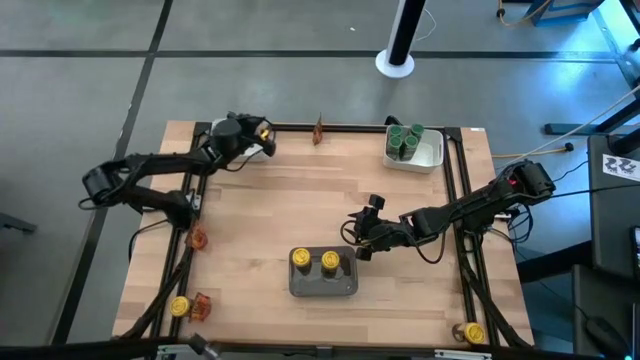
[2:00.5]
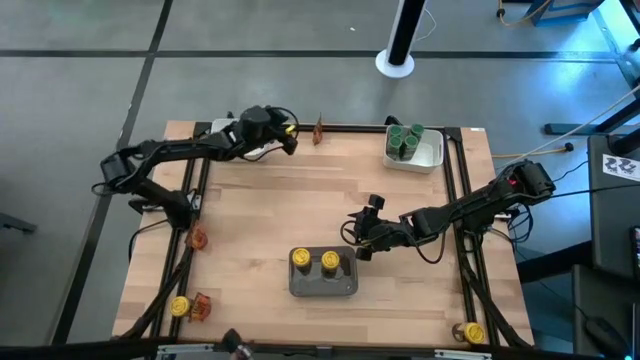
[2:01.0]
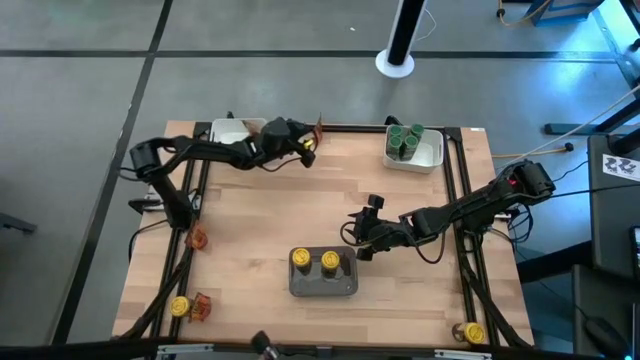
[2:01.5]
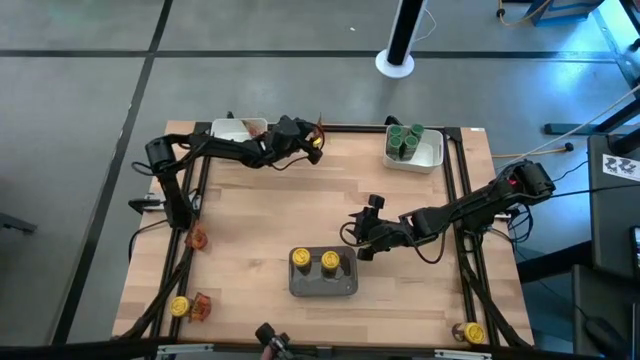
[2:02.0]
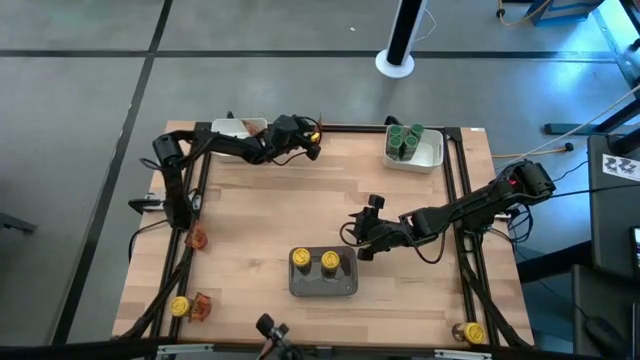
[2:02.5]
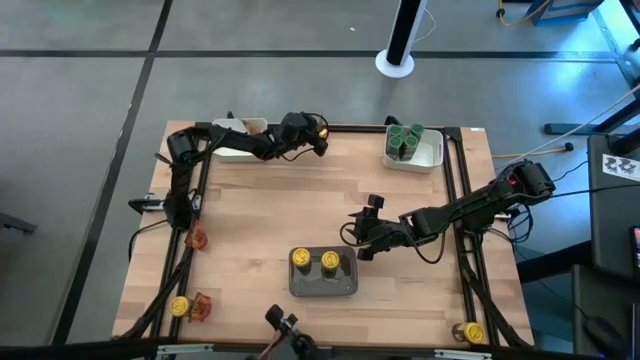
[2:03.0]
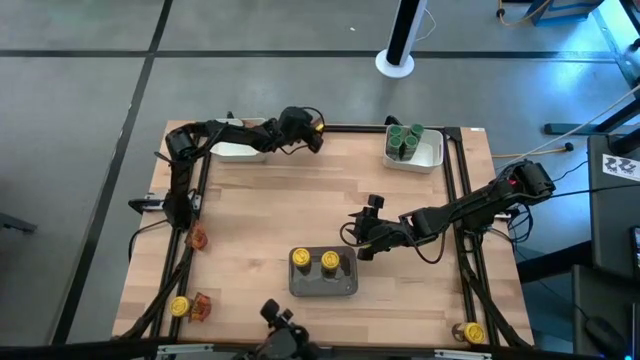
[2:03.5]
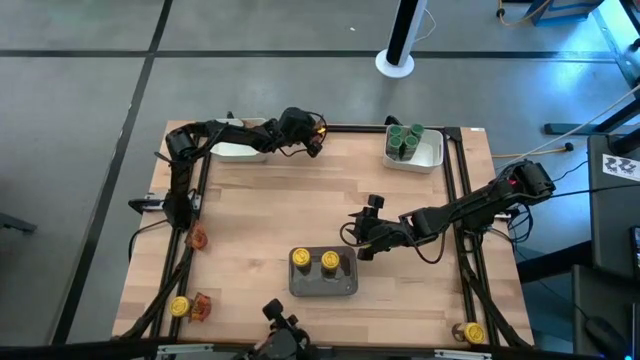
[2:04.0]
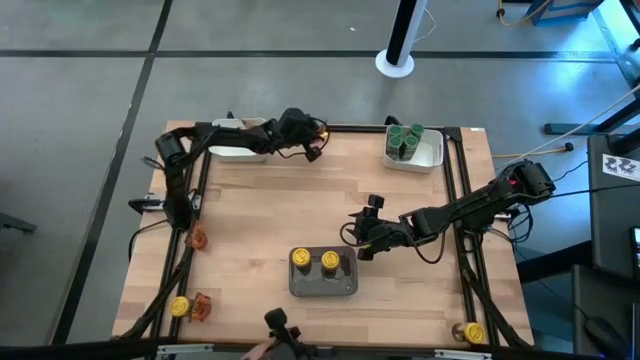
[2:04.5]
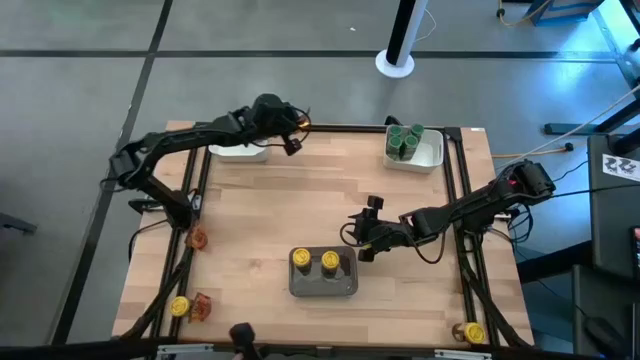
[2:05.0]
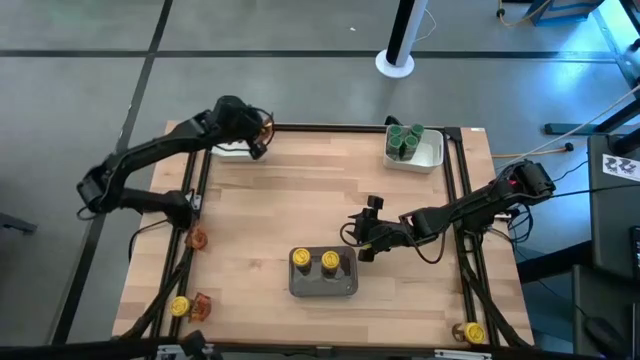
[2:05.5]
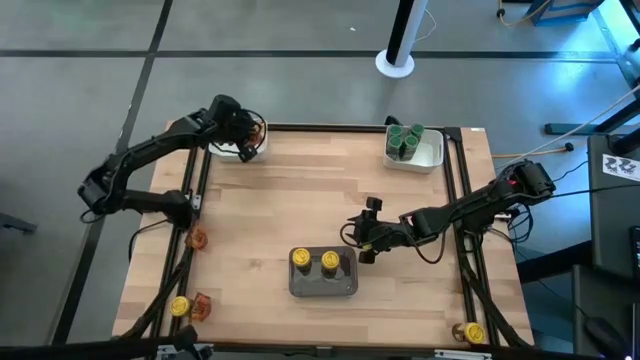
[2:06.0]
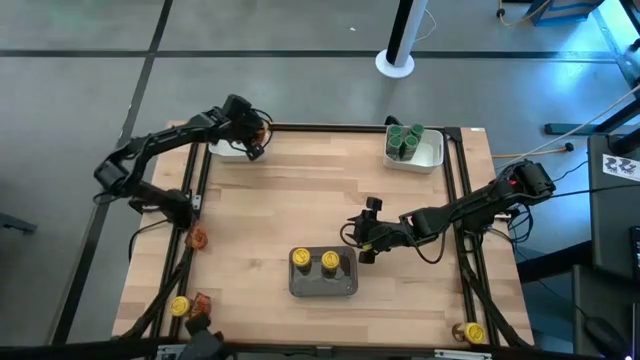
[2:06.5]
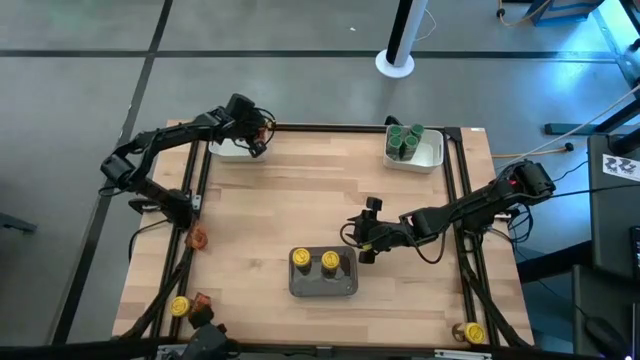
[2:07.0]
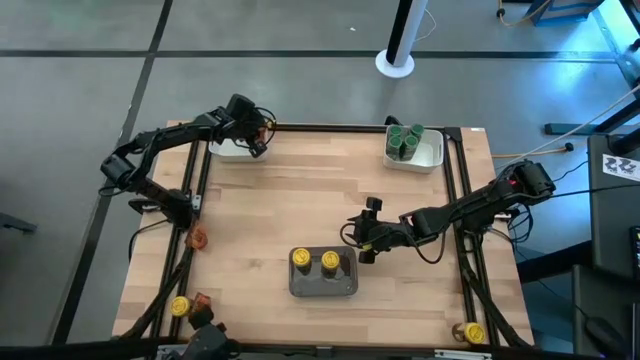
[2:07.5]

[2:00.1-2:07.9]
Task: Sort spices by type
Put the top center orange seasoning bag into the left white bin

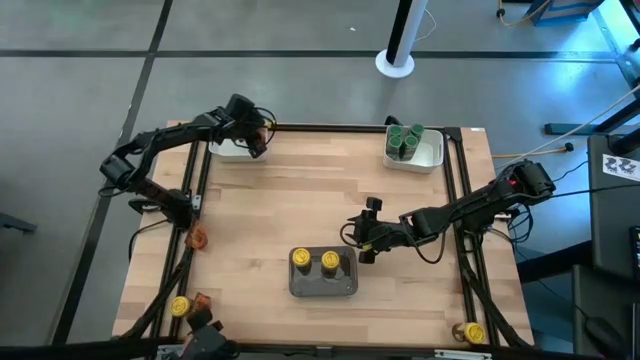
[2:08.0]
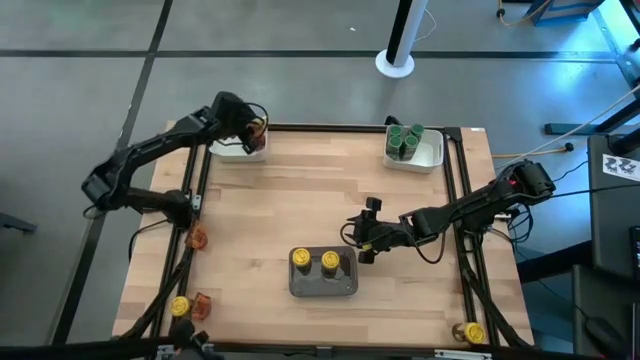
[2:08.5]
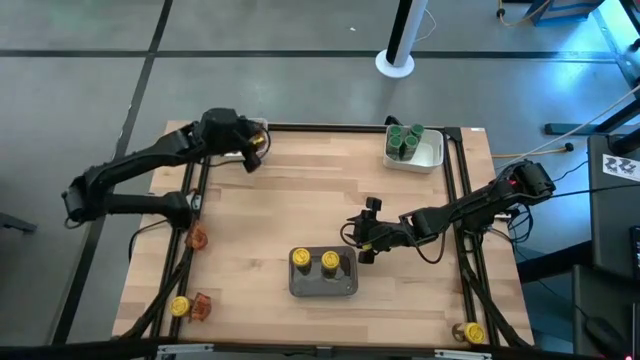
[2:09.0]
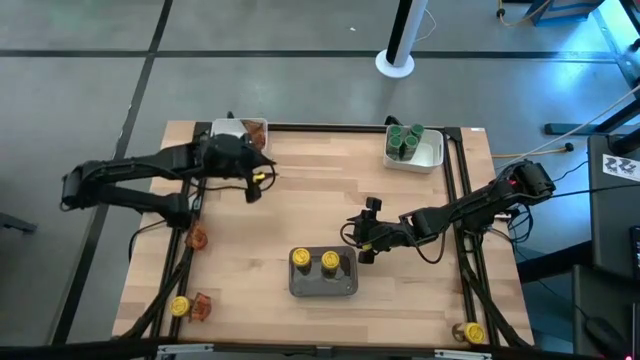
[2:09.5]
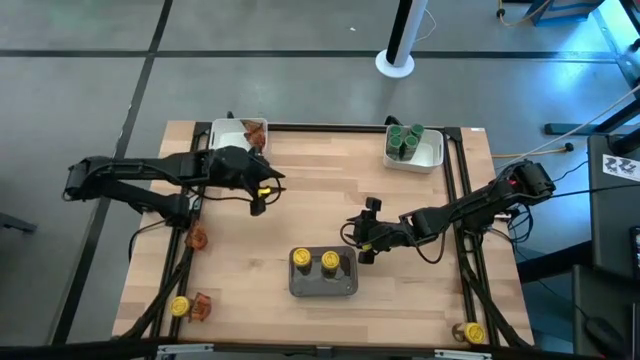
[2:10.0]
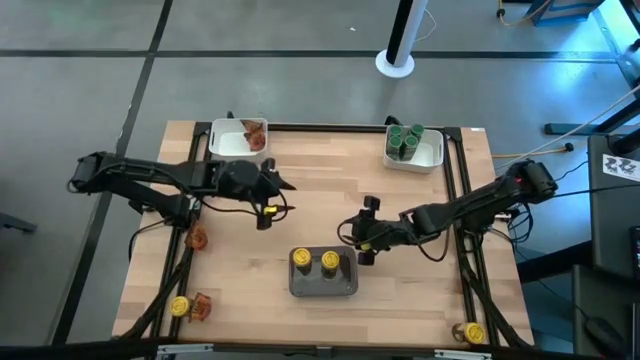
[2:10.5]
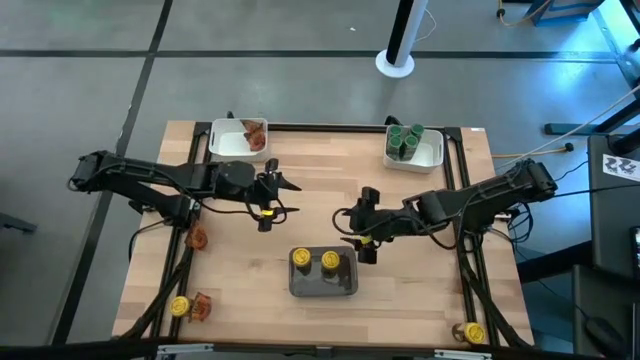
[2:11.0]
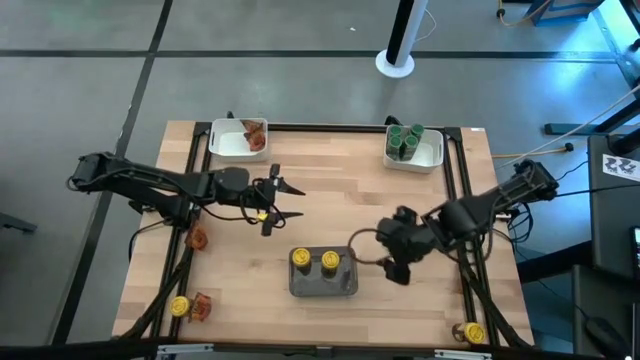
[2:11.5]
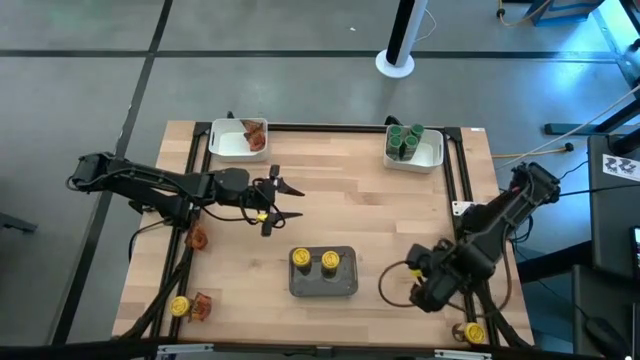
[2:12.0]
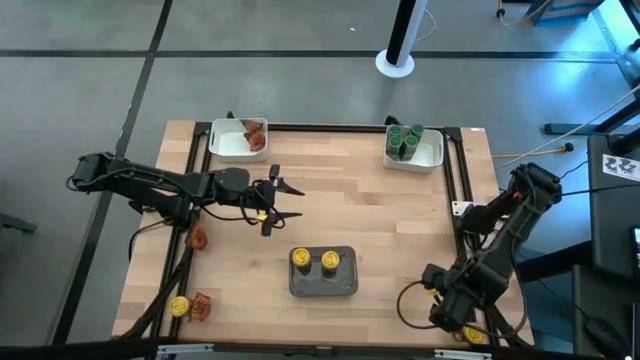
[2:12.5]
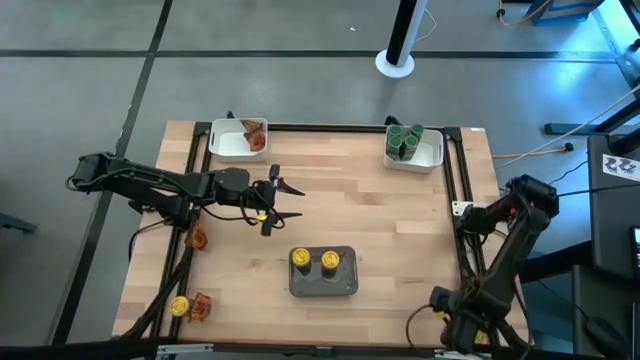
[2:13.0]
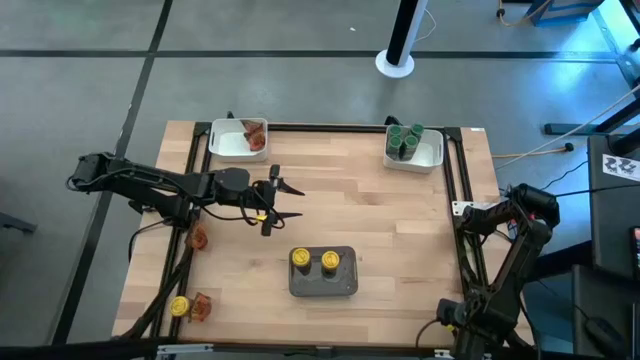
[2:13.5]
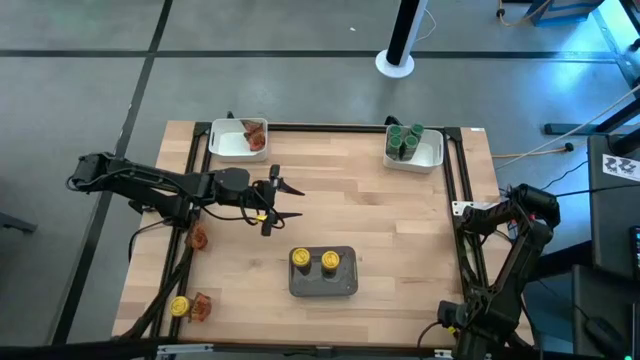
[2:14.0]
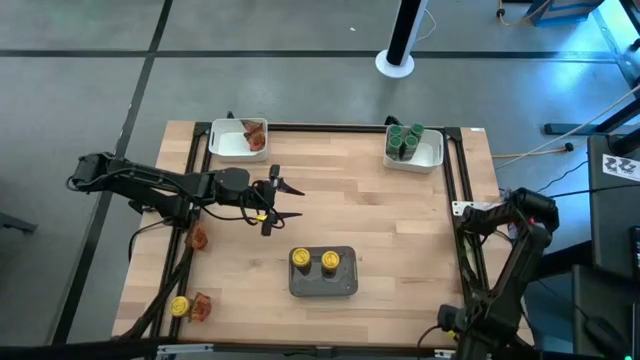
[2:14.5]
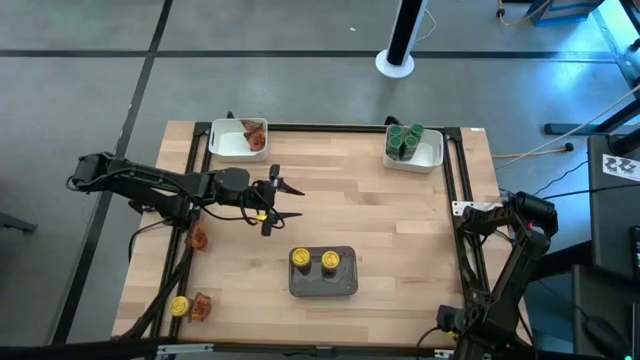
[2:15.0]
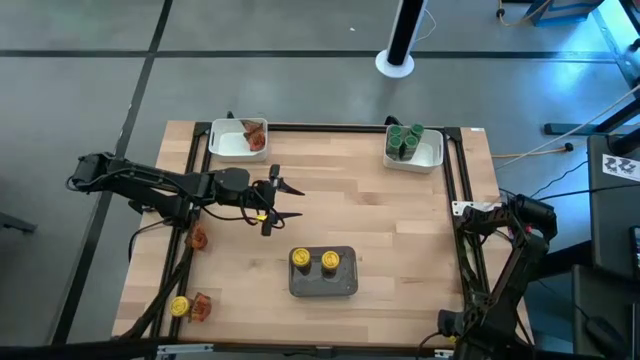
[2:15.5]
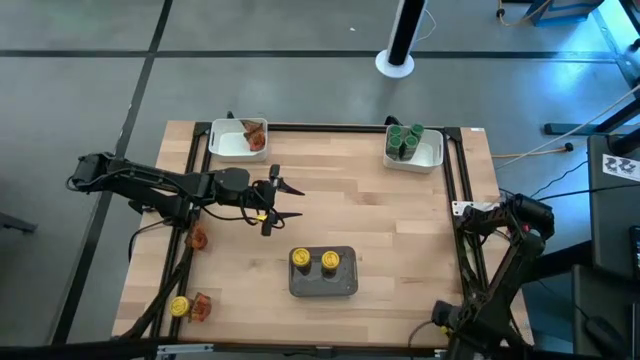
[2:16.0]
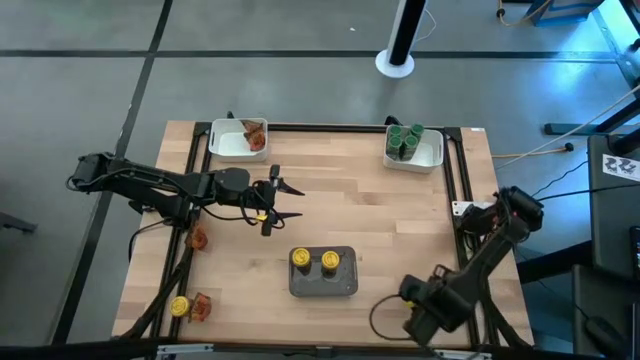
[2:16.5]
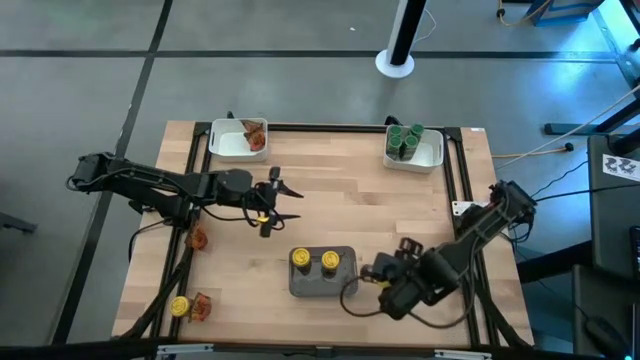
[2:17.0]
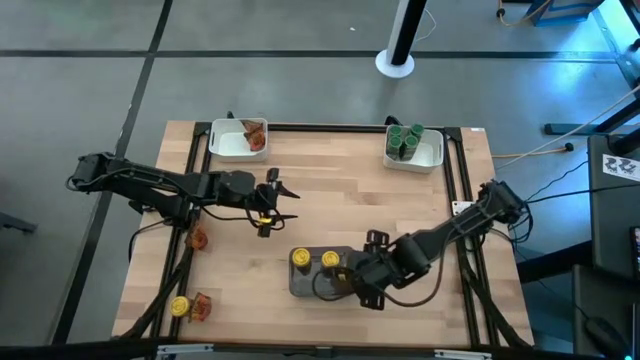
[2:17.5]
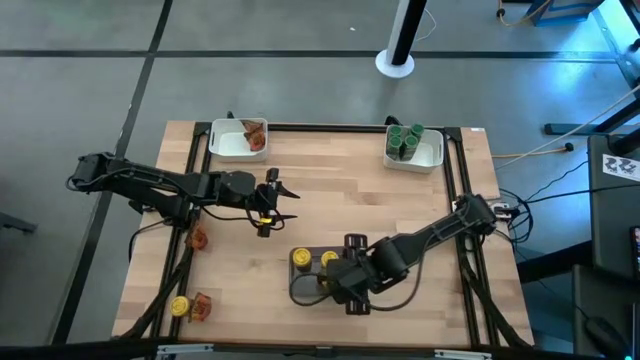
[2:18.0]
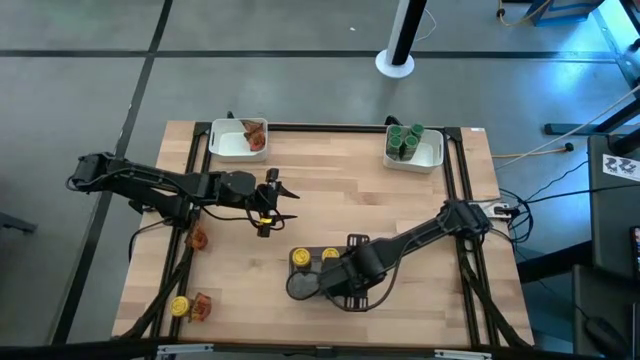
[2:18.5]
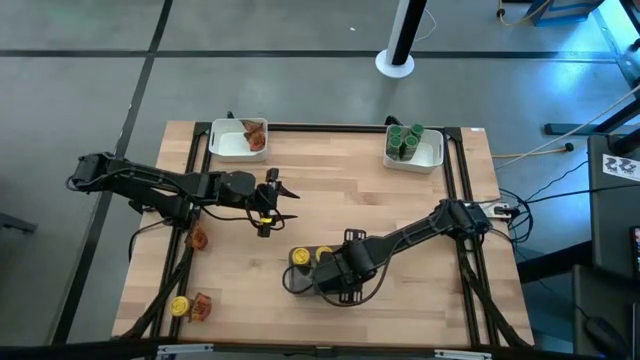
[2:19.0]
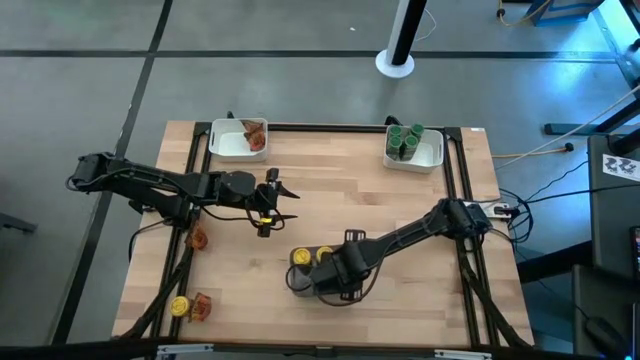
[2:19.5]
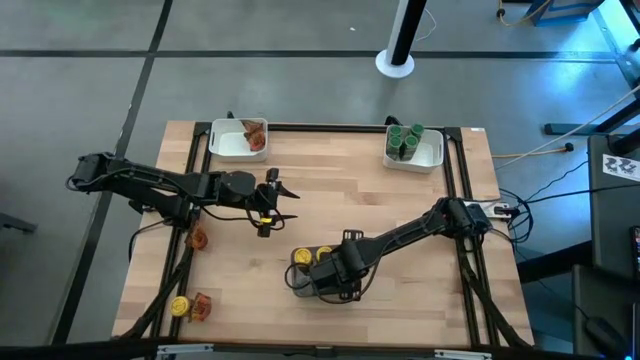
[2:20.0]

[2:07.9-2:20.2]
Put the right yellow seasoning bottle into the black bin

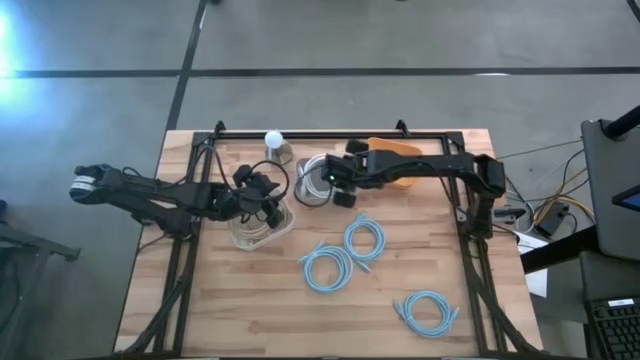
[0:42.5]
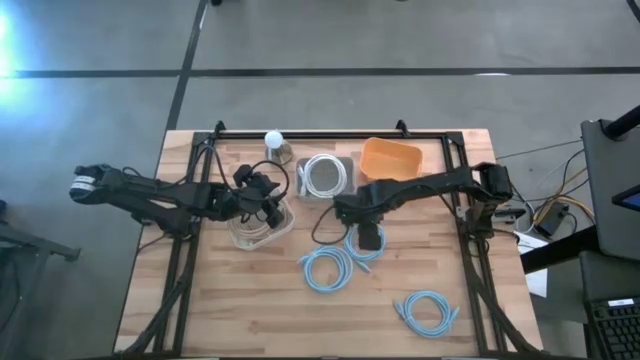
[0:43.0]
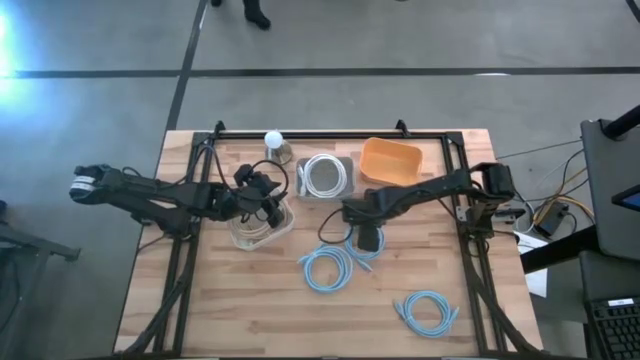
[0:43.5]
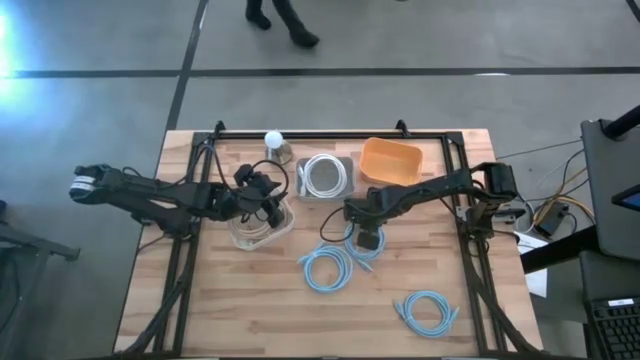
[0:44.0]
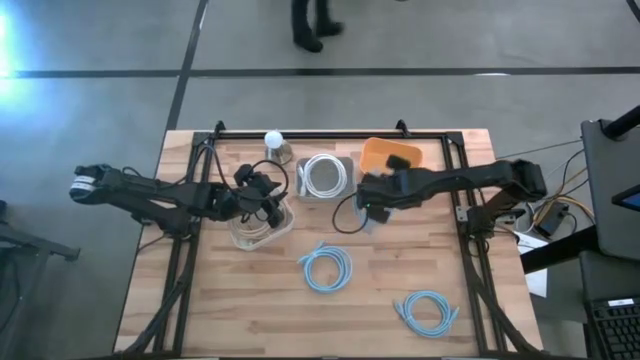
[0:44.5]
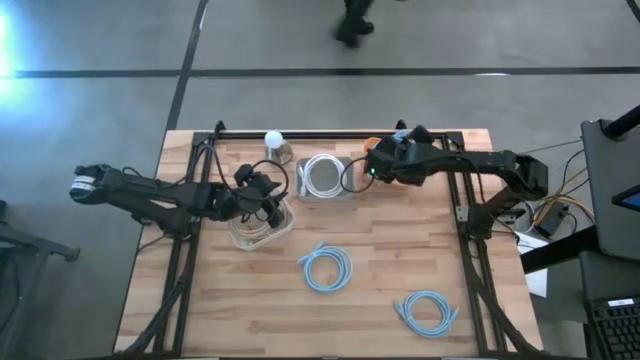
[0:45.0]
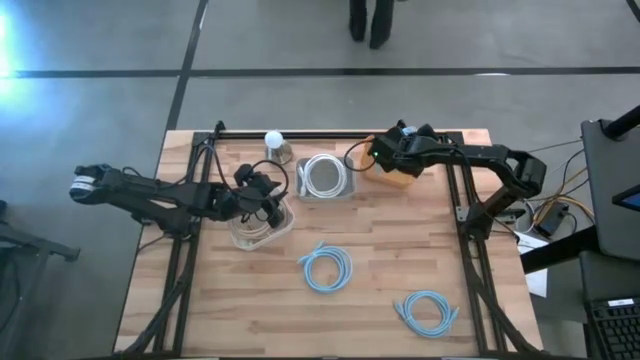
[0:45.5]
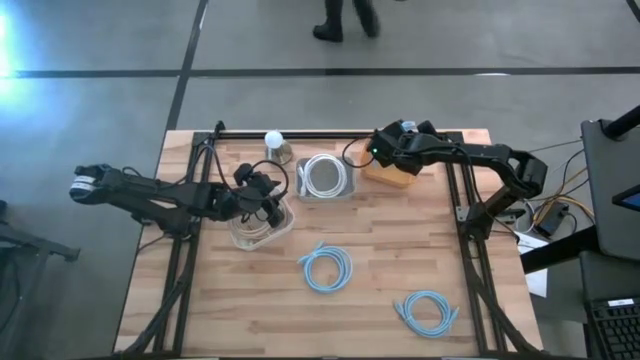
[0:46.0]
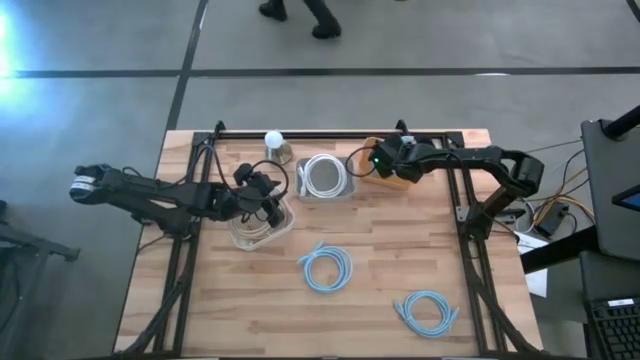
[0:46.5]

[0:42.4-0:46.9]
Task: Sort HDMI cables
Put the top right blue HDMI cable into the yellow bin
